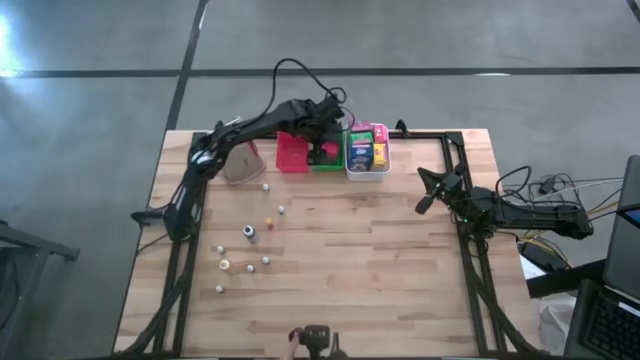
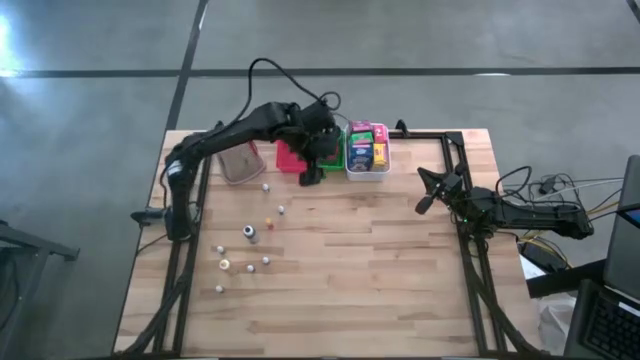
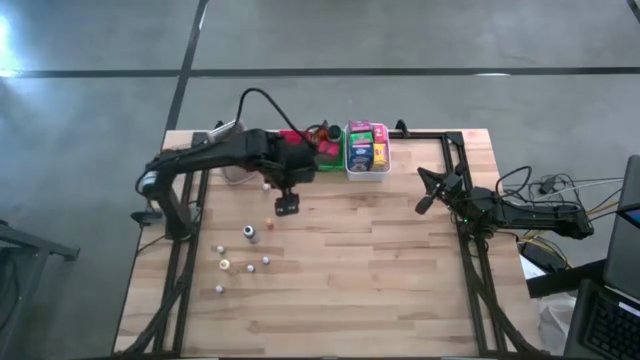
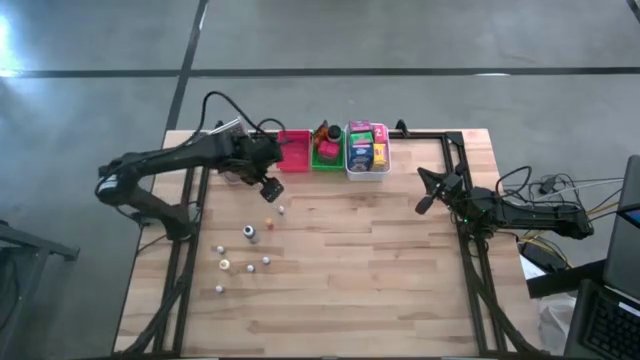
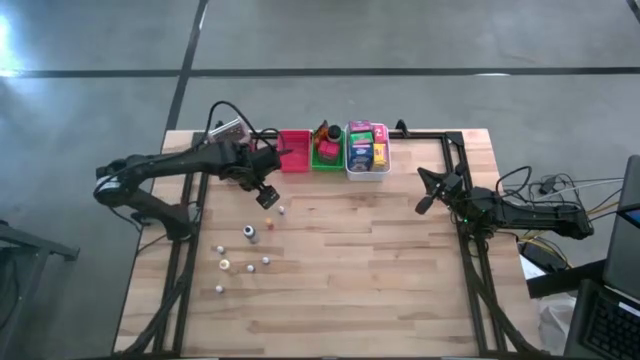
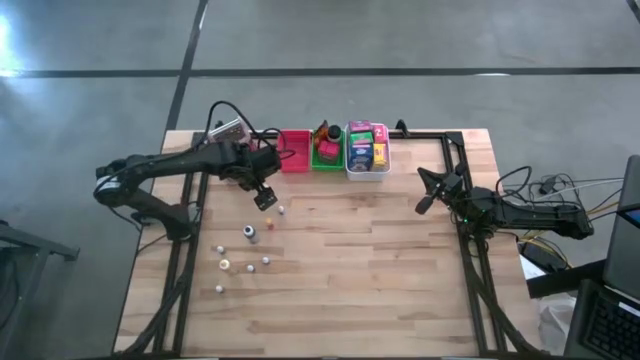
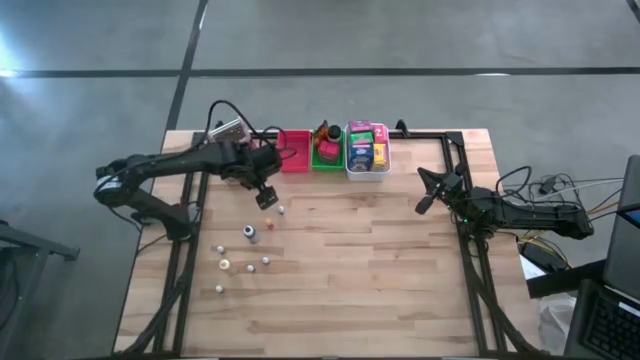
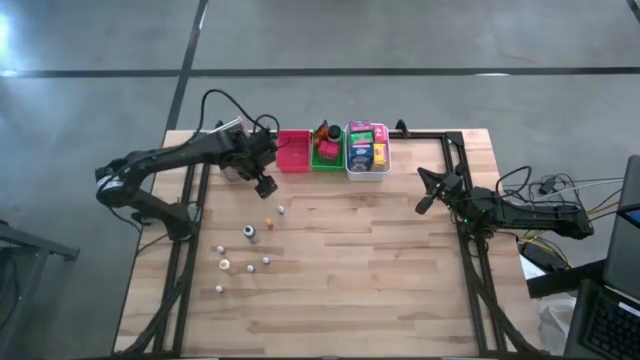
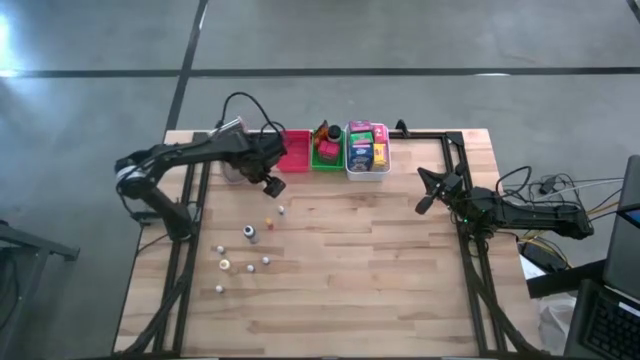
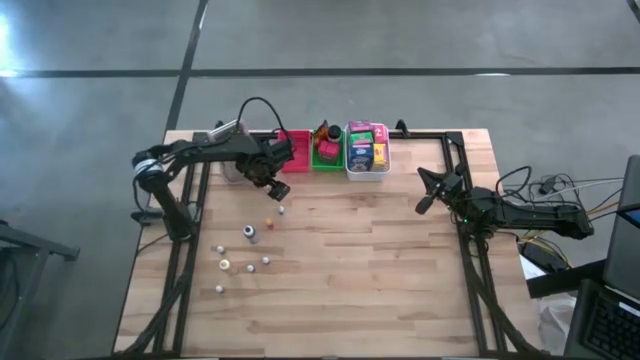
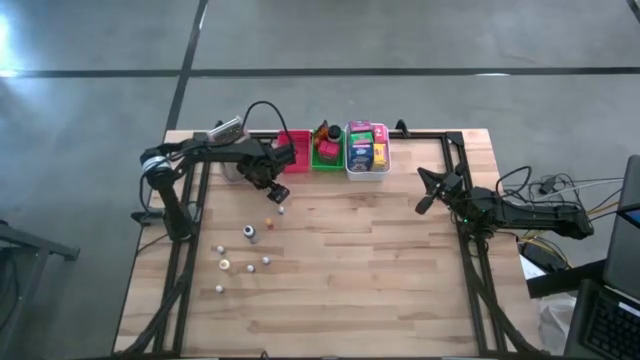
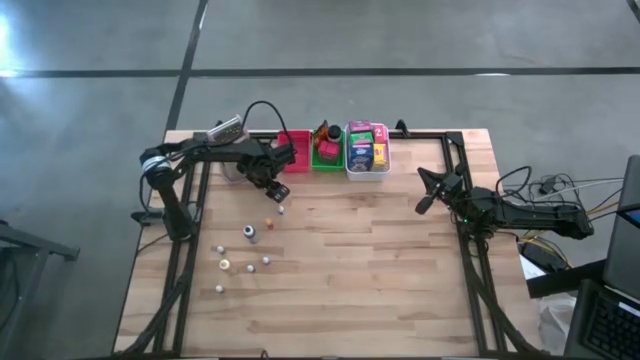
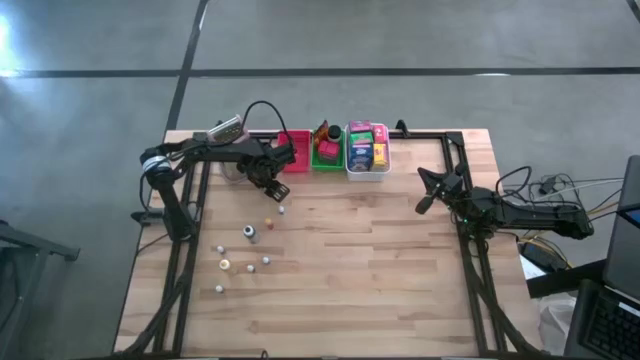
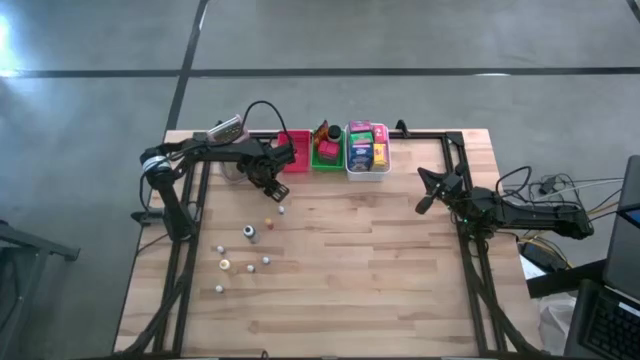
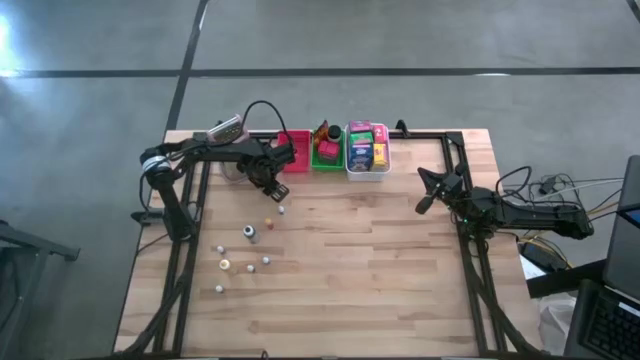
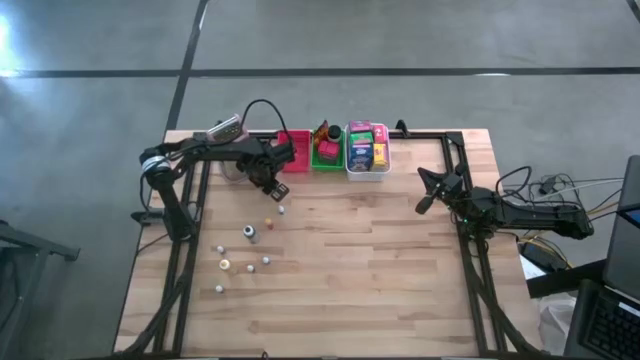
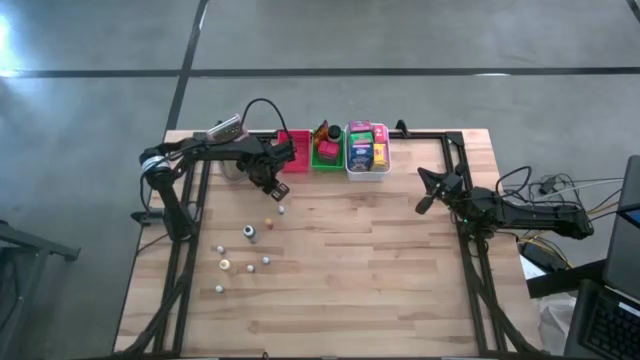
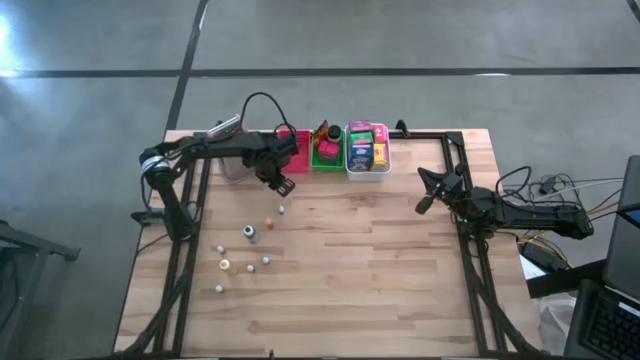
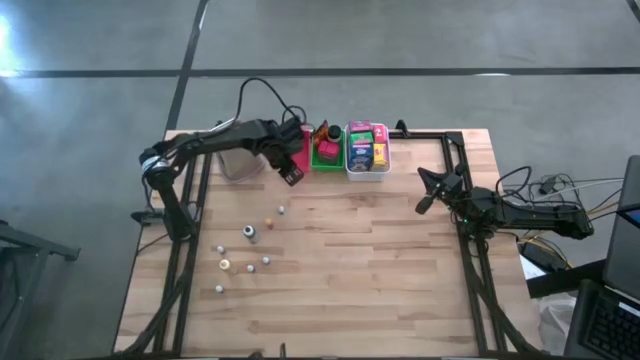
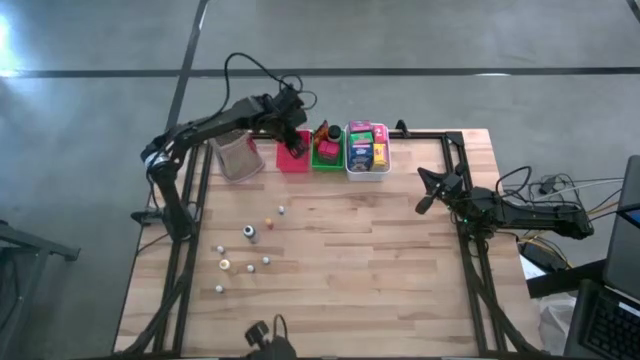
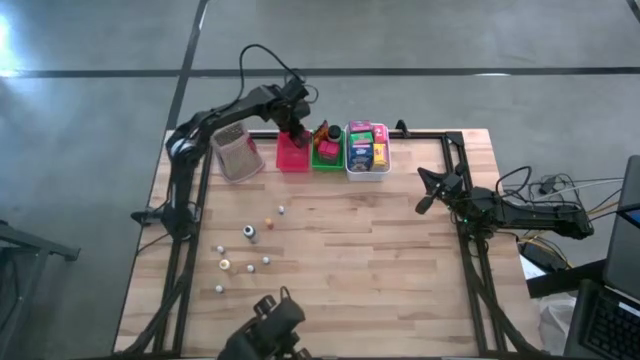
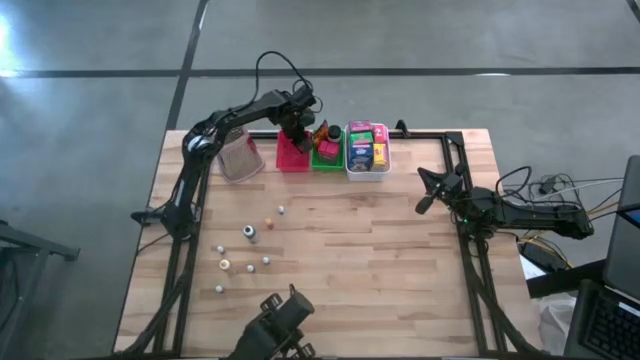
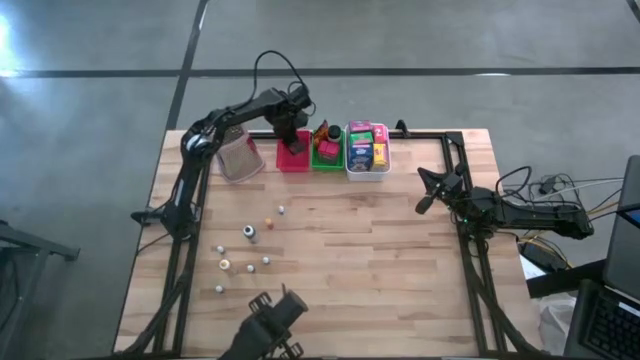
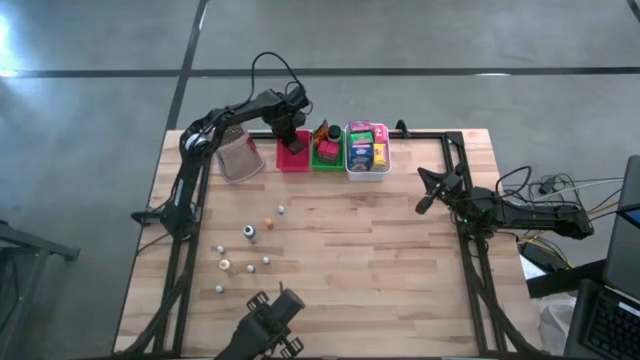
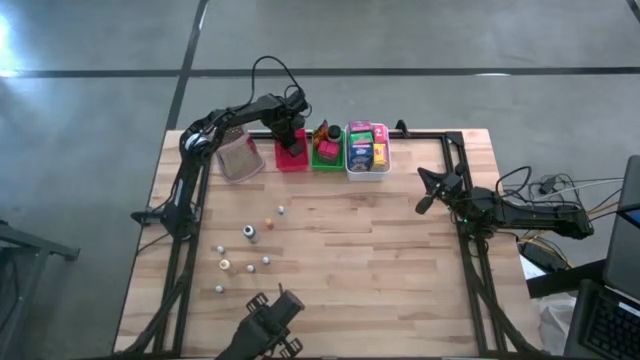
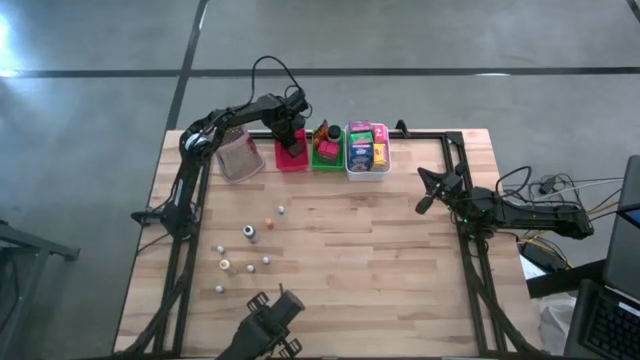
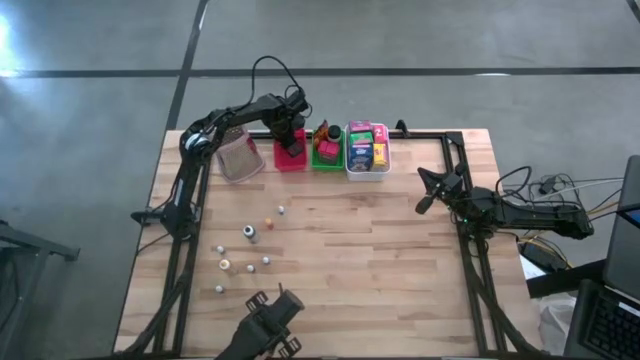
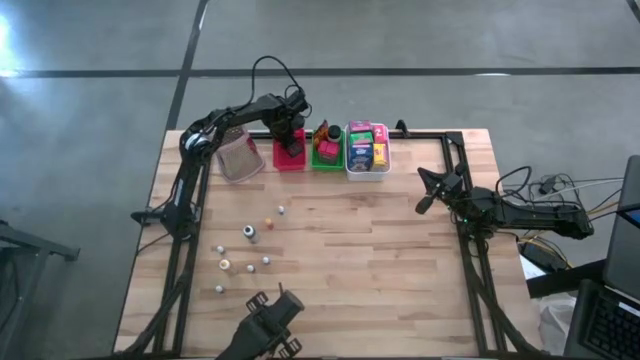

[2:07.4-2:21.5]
Task: Pick & Place Kitchen Items
Put the small black food coloring bottle into the red bin

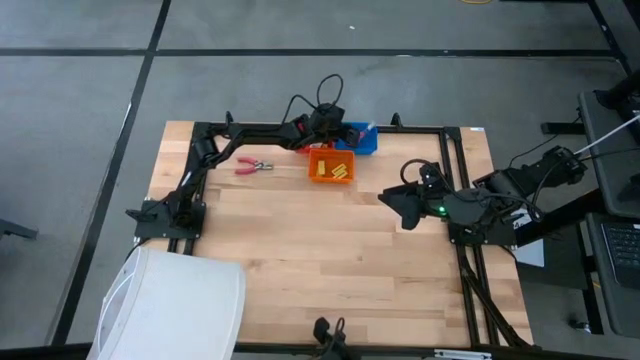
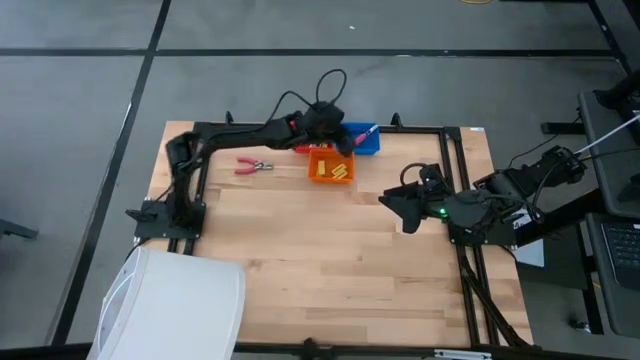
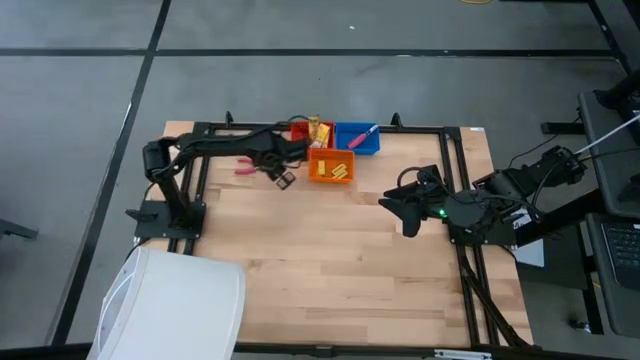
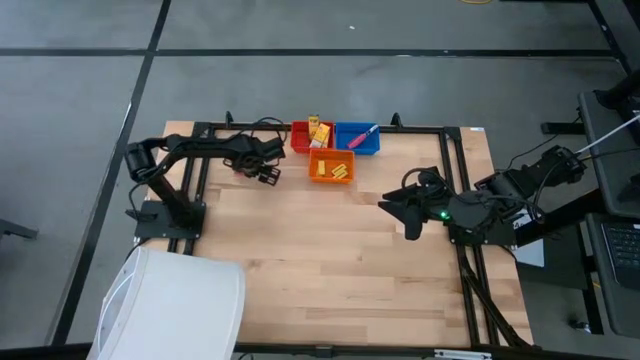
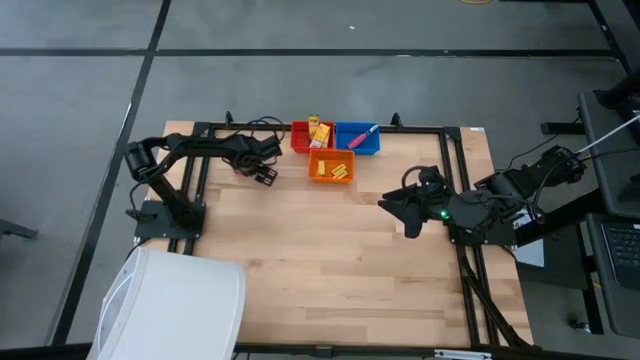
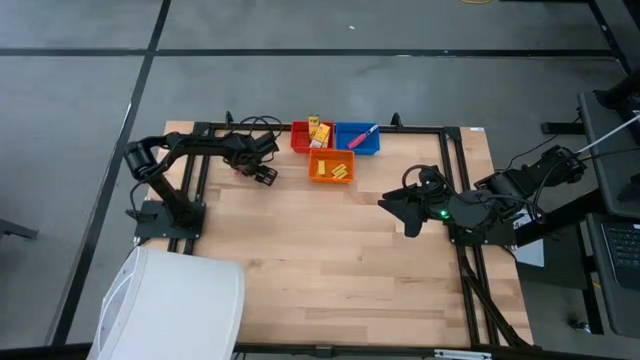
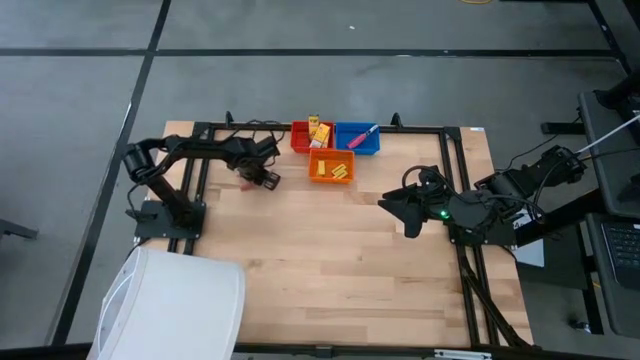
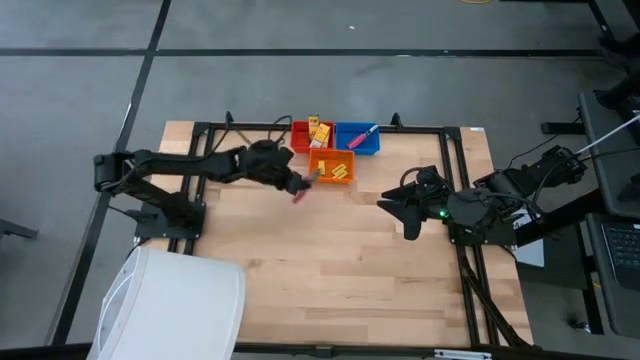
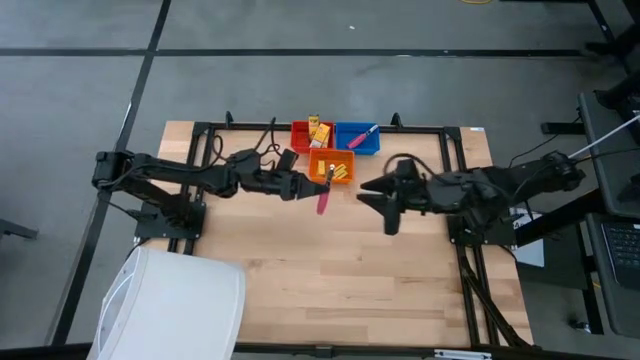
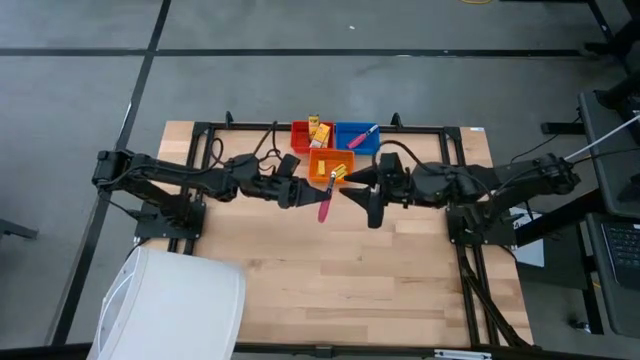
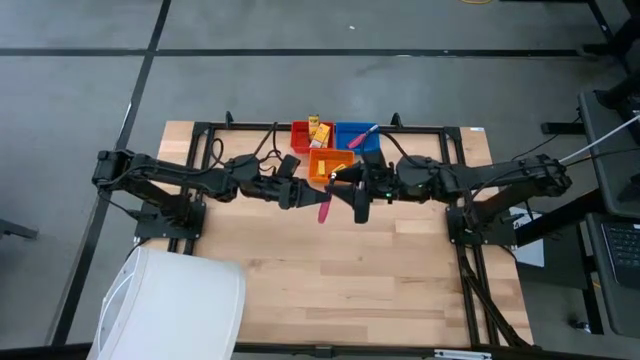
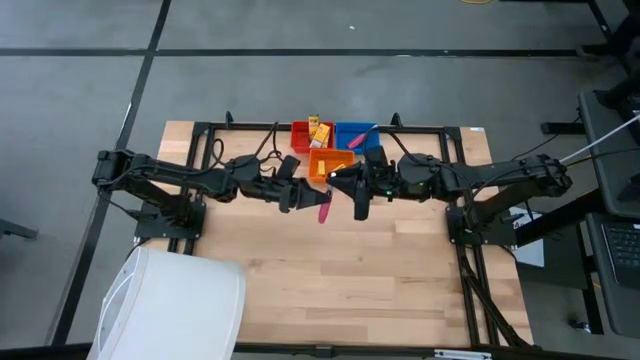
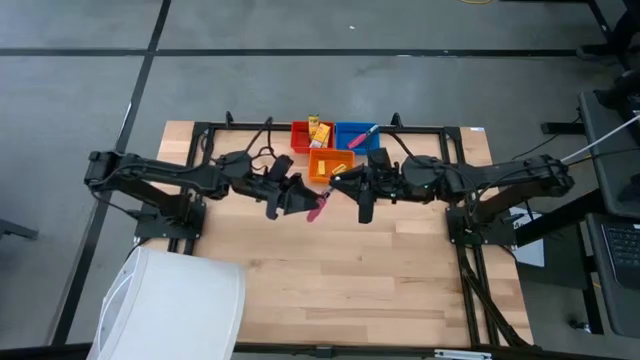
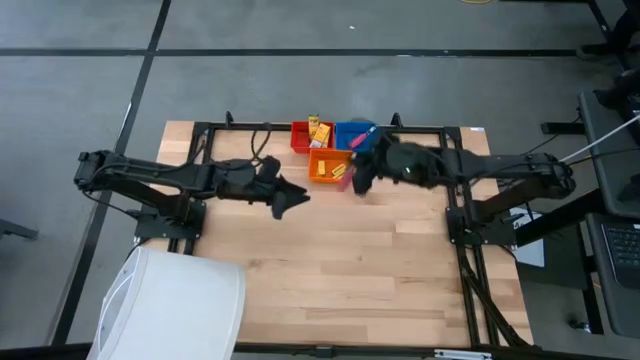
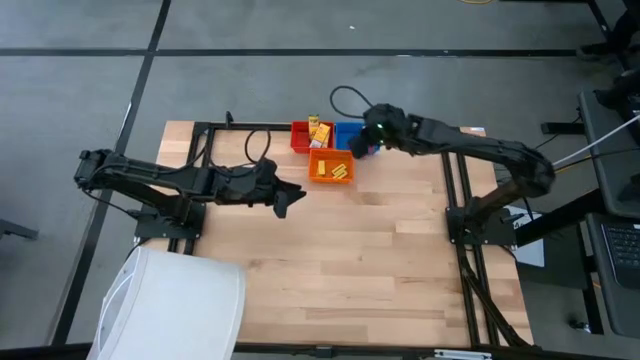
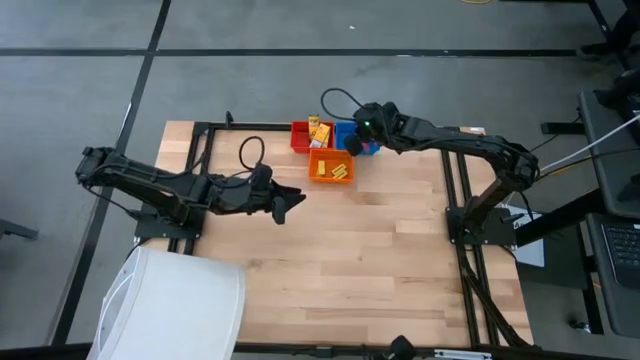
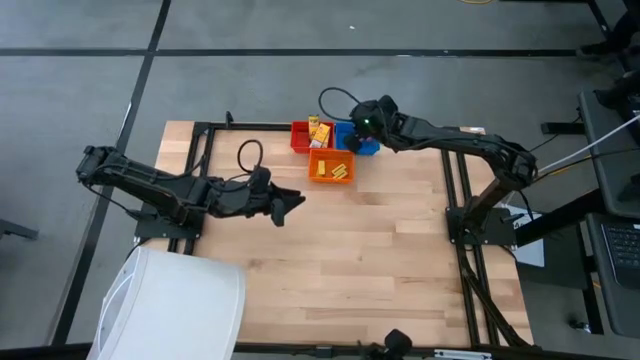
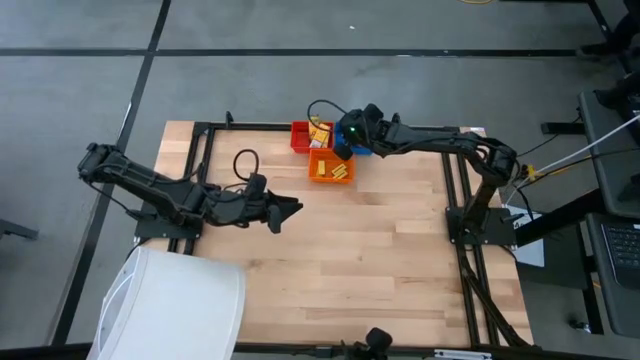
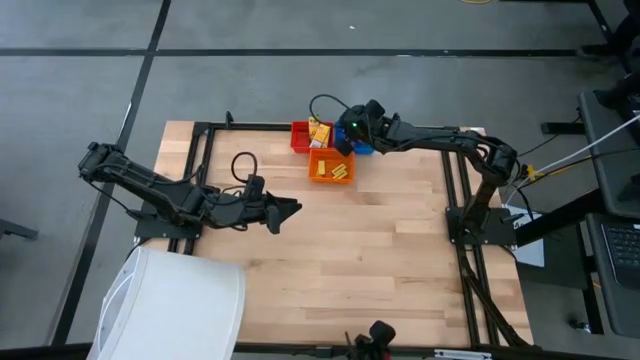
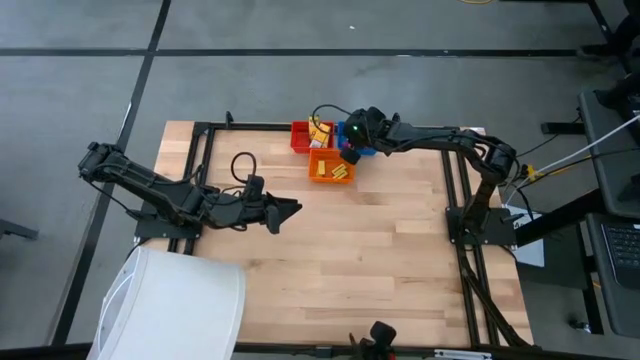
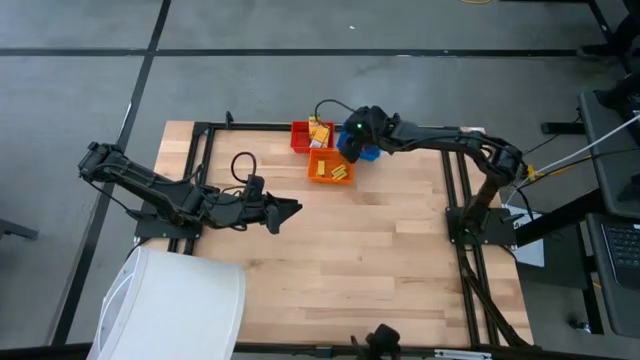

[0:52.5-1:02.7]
Task: Pick & Place School Supplies
Put the pink hole punchers into the blue bin
